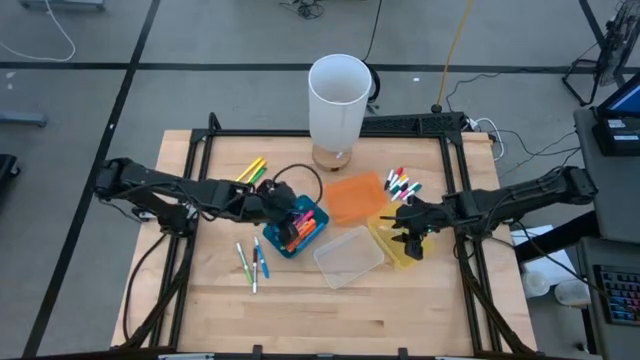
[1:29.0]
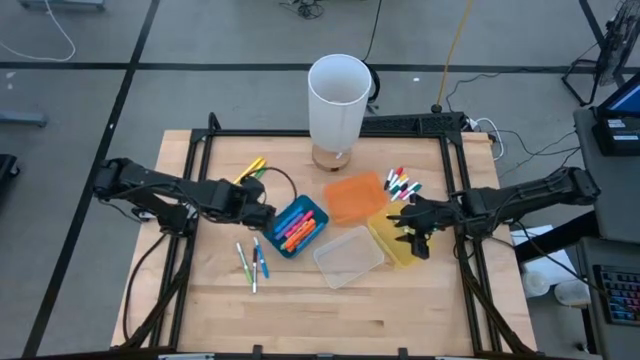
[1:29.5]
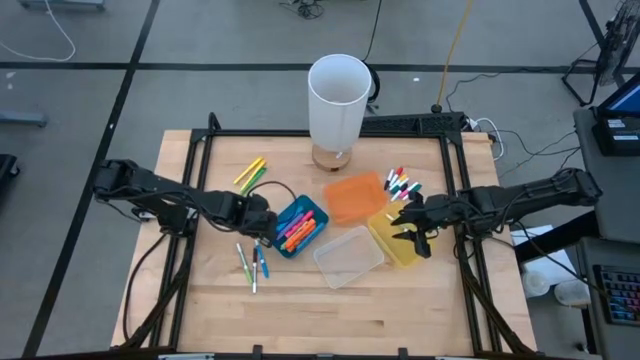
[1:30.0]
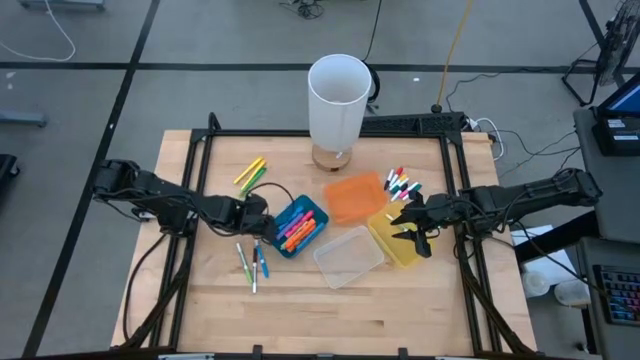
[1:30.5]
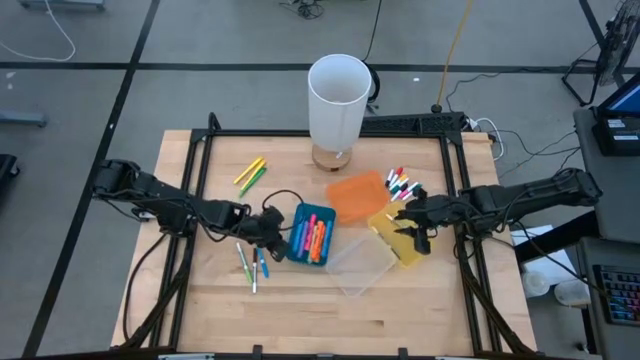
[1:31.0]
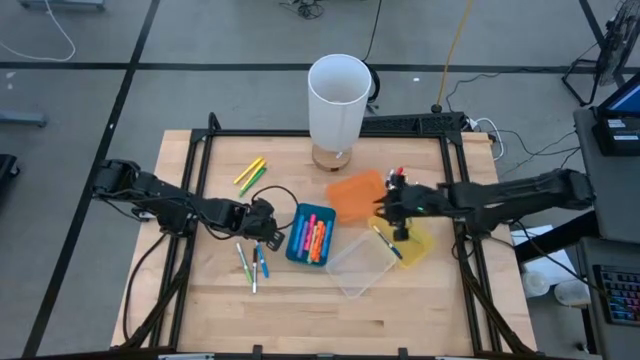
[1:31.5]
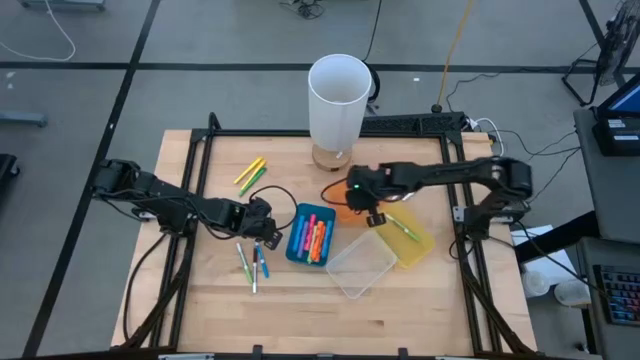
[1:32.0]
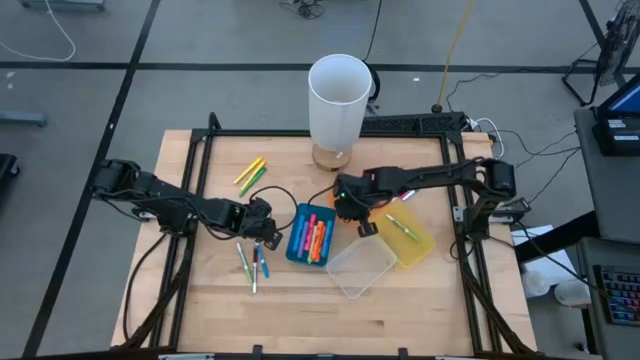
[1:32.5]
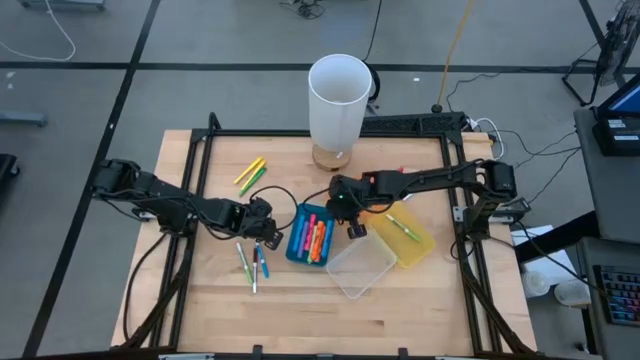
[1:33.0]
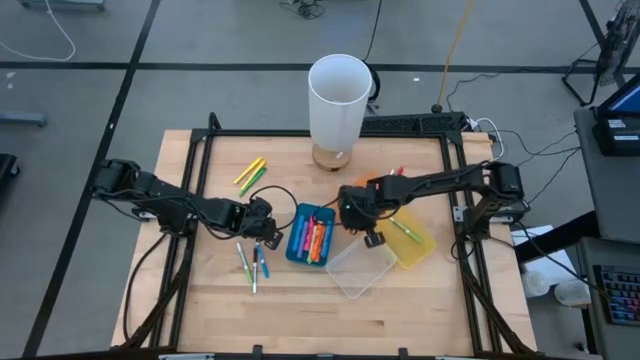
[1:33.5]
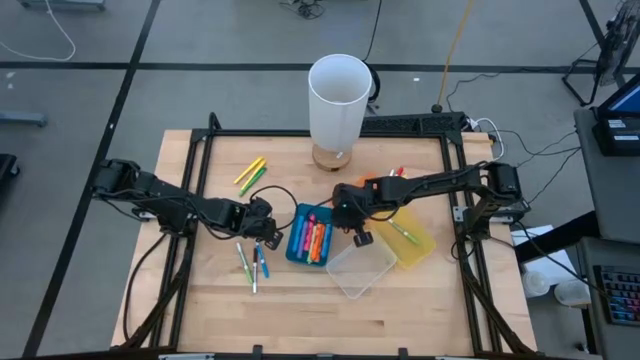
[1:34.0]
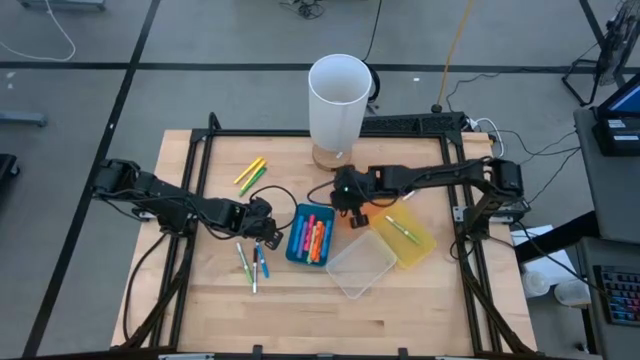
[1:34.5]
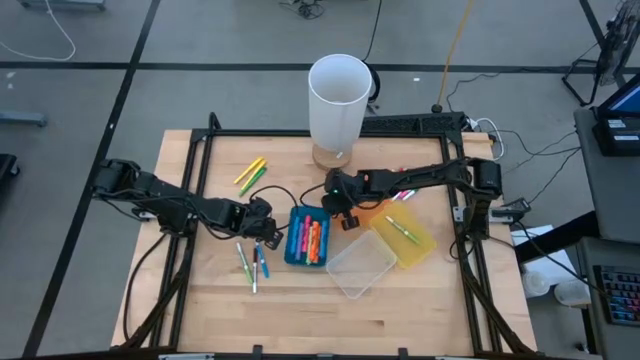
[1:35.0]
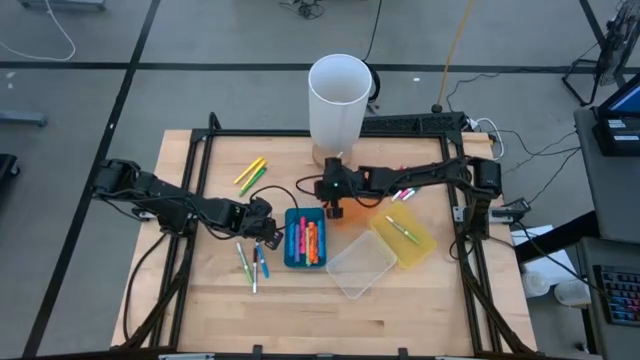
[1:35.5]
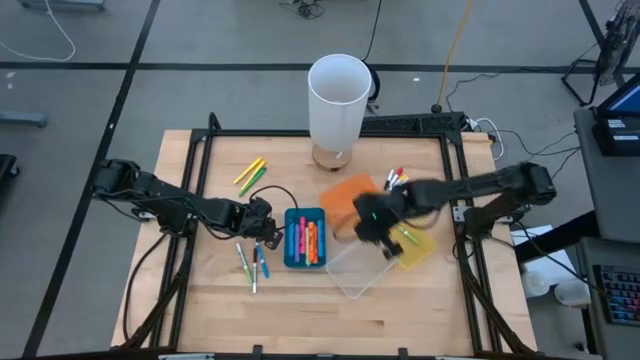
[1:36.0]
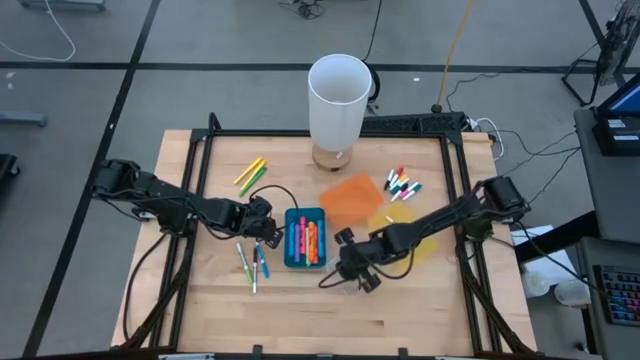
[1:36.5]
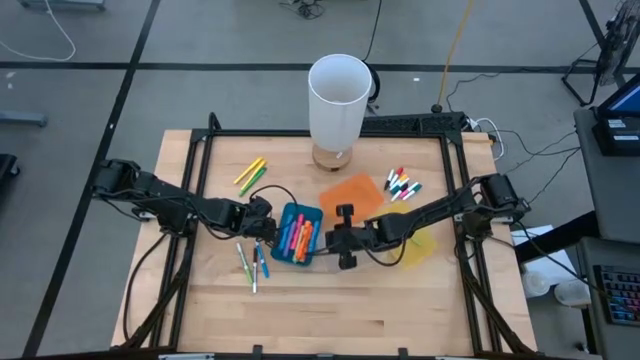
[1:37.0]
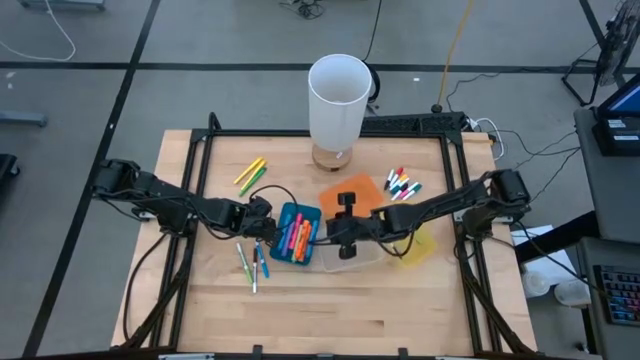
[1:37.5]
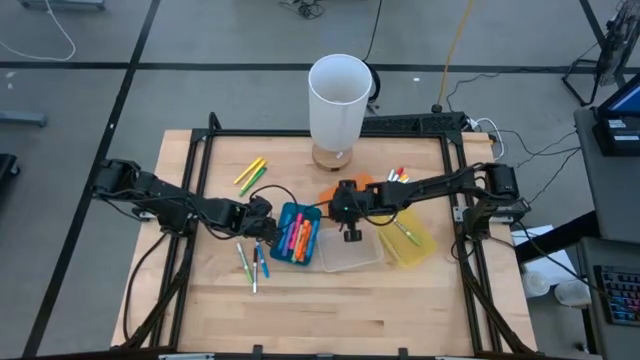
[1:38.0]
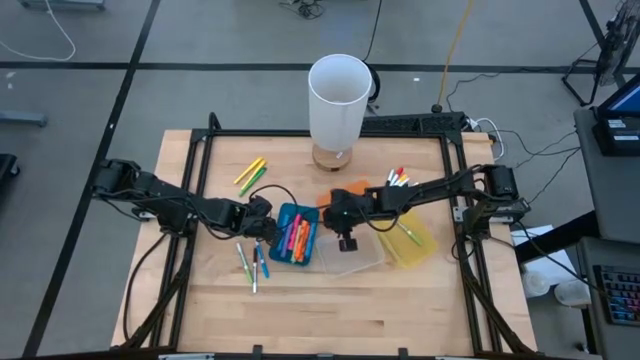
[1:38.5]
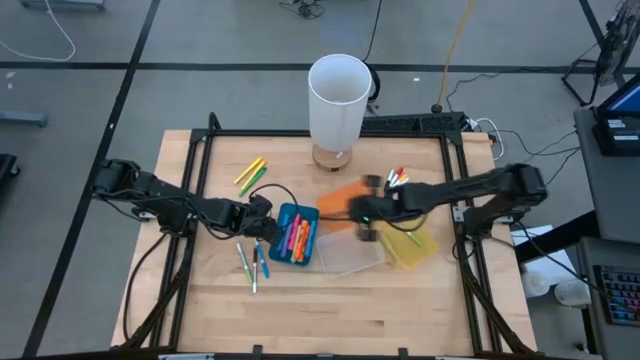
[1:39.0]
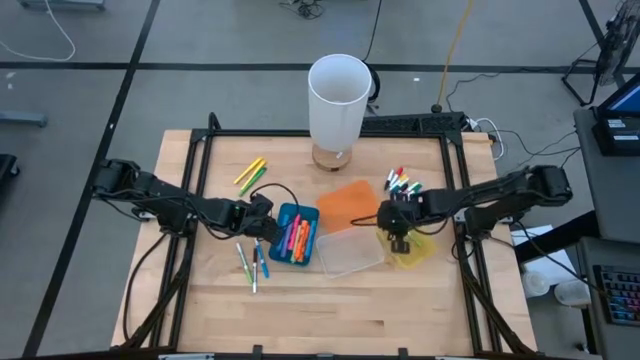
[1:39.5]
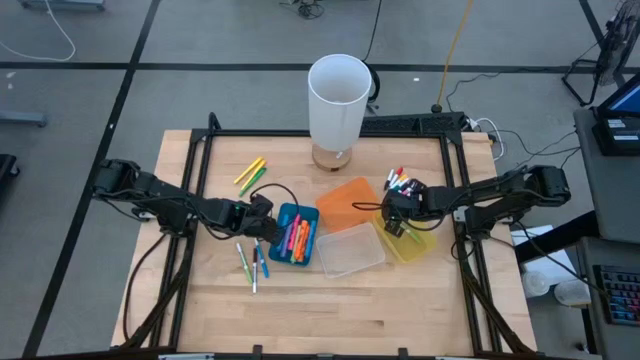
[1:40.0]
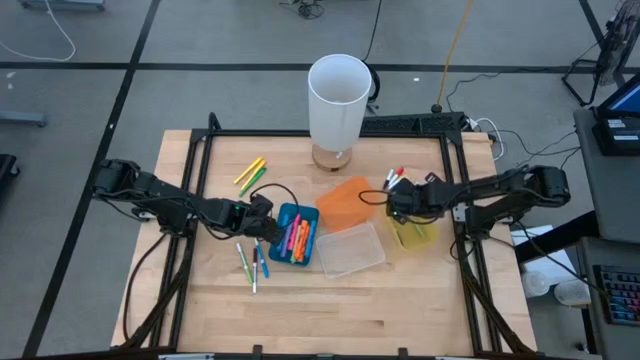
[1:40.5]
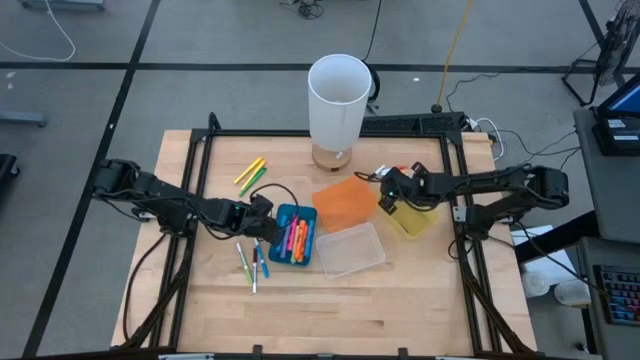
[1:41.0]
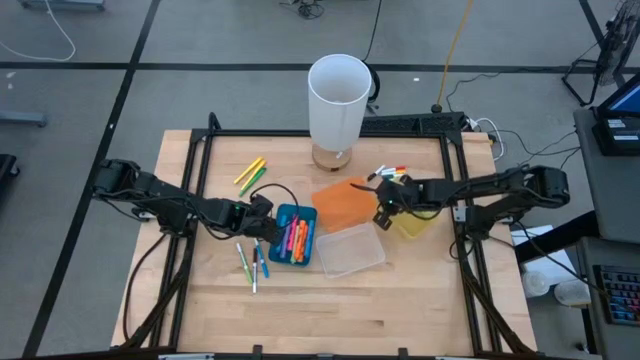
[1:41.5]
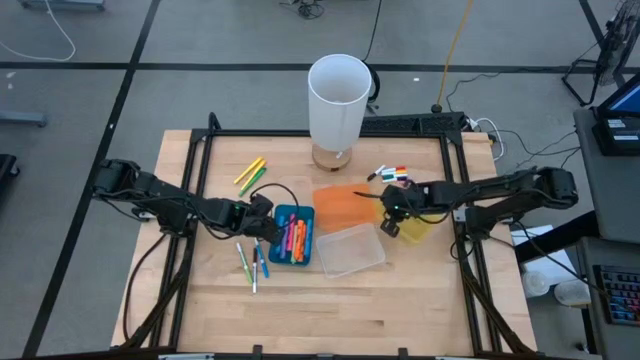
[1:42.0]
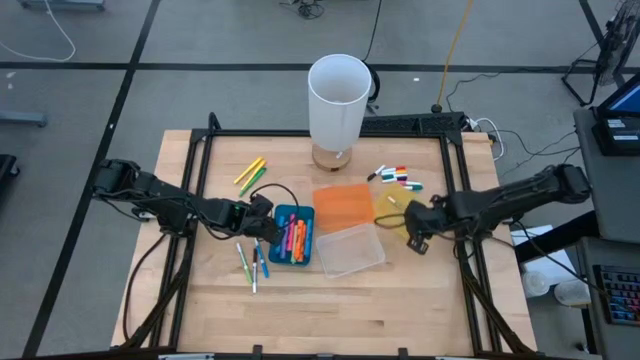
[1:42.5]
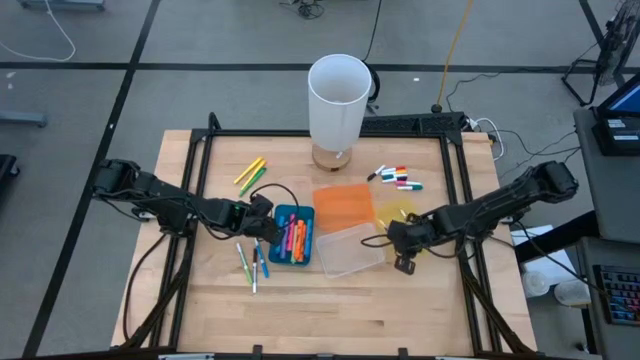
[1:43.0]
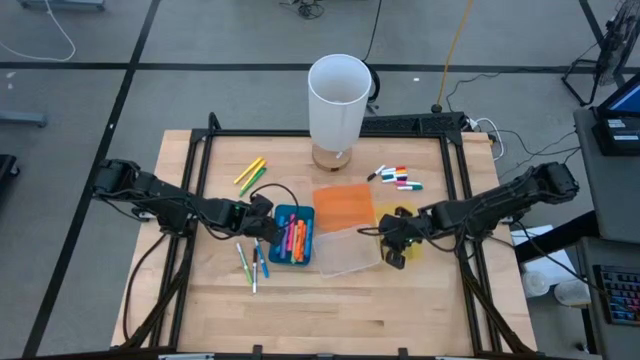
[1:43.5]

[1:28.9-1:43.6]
Task: Pick & Place Markers
Adjust the bins on the table

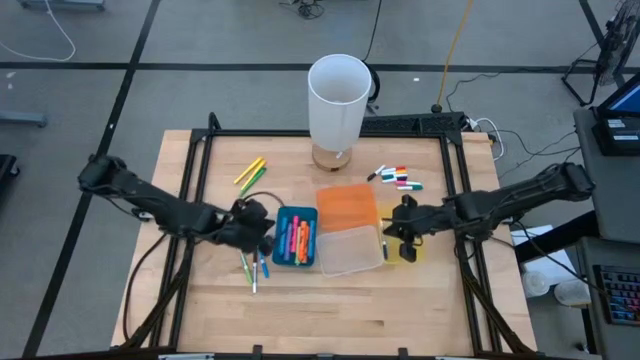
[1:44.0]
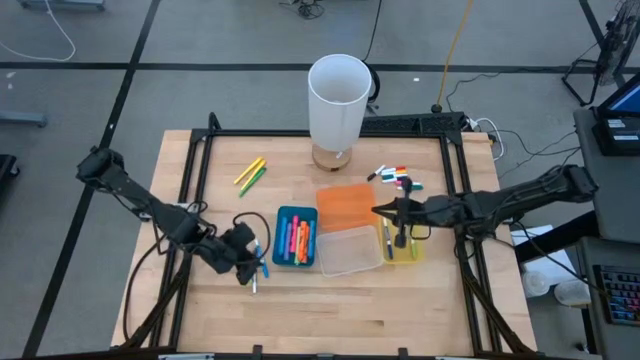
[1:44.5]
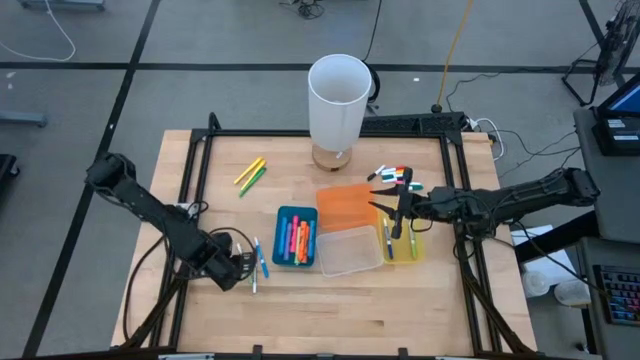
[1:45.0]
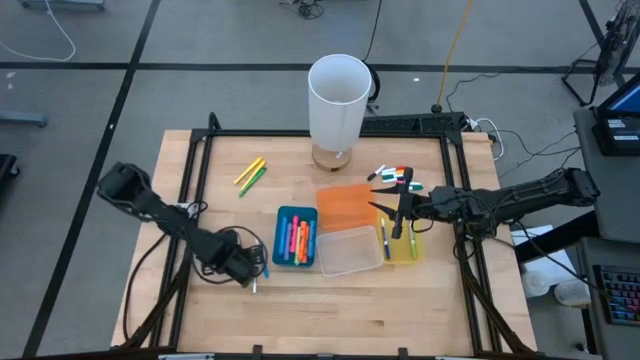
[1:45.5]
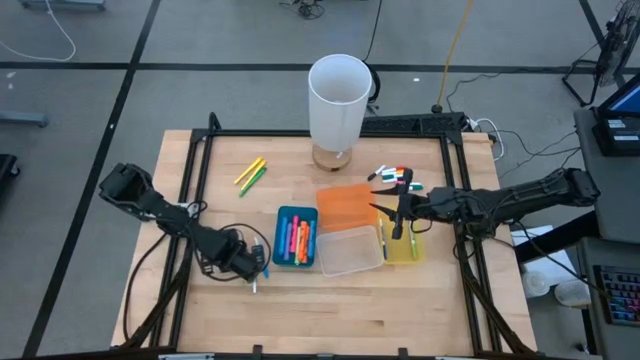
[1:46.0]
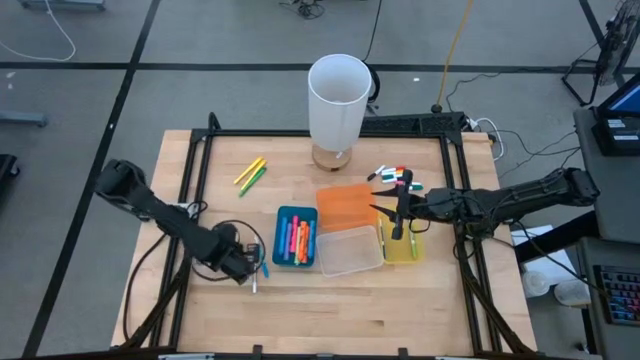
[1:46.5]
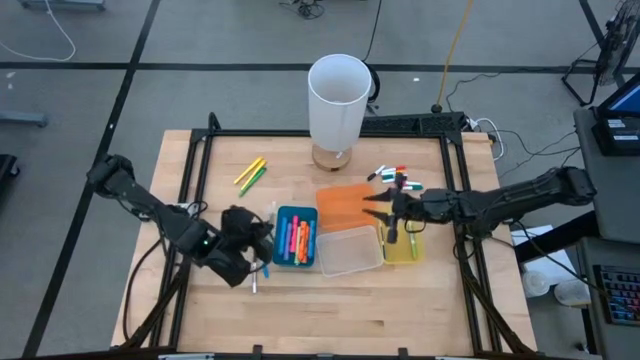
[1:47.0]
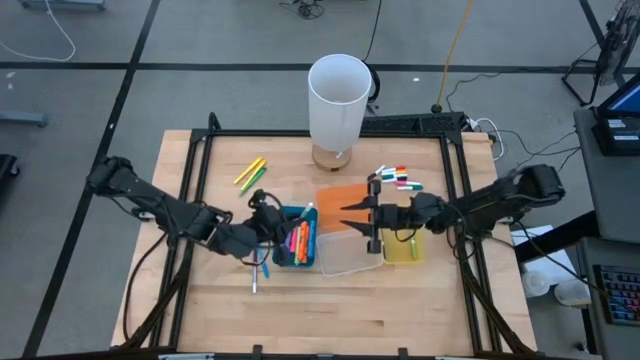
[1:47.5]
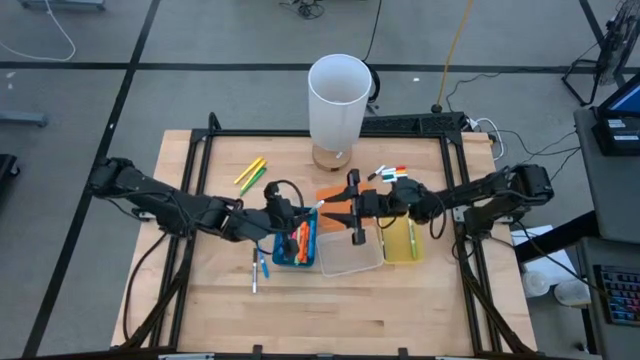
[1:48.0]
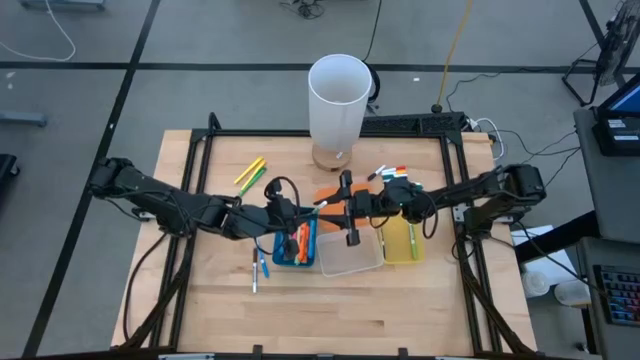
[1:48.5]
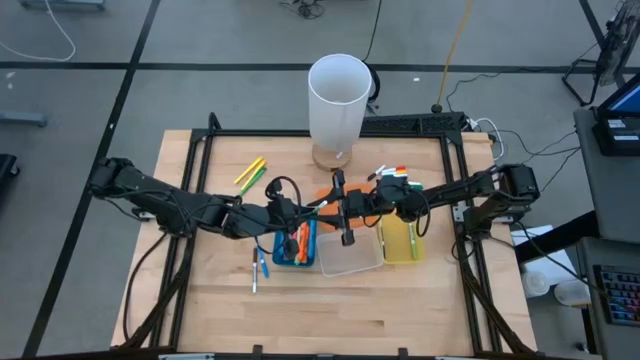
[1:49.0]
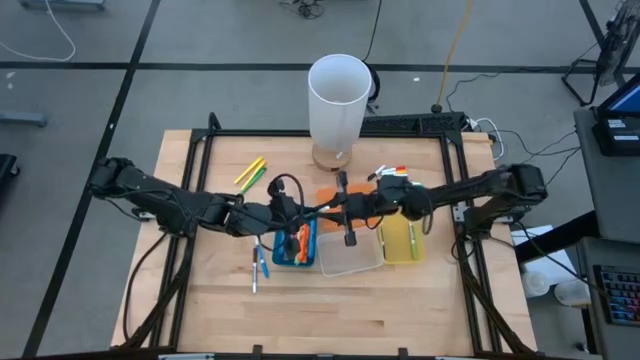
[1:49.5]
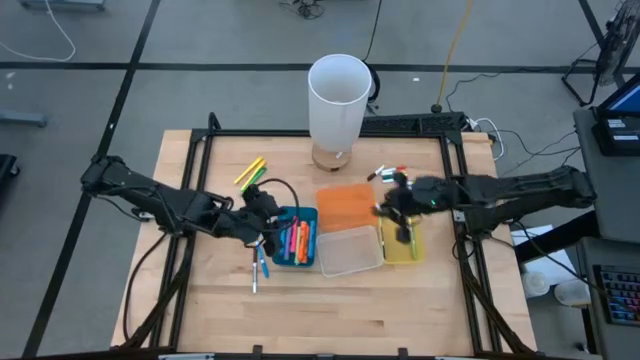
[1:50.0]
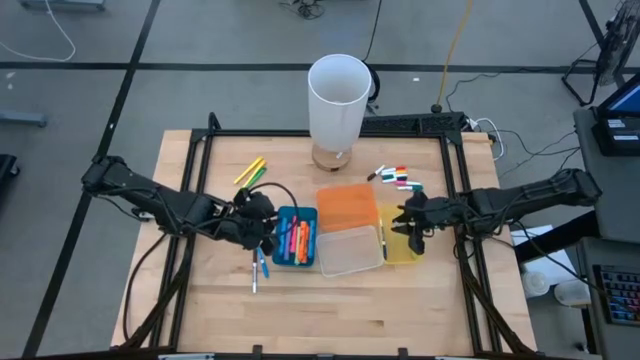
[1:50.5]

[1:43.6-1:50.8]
Put the green marker pen into the yellow bin

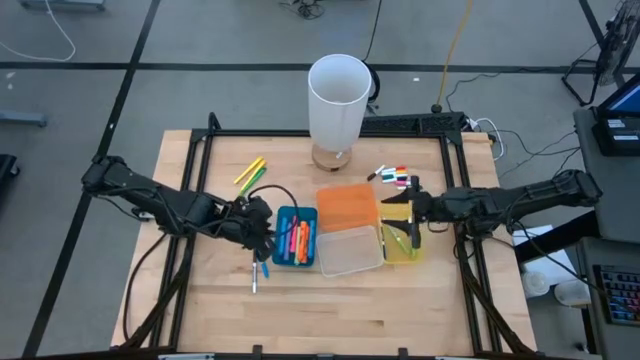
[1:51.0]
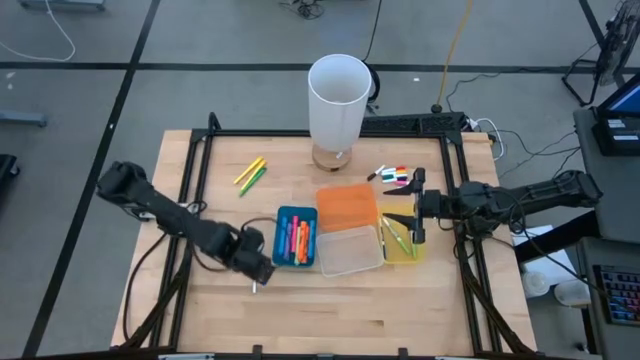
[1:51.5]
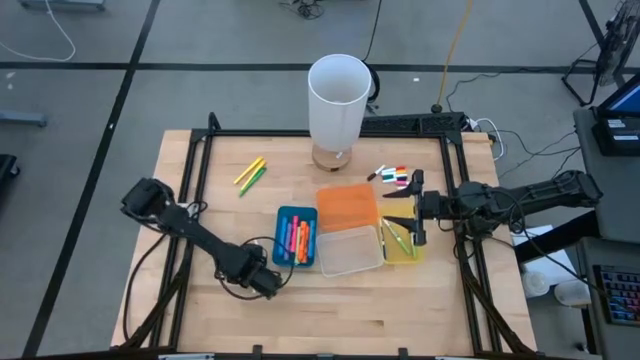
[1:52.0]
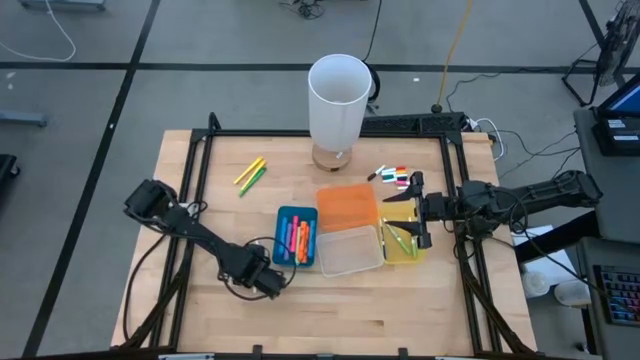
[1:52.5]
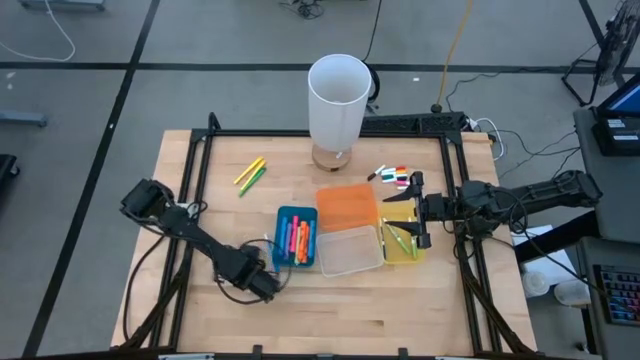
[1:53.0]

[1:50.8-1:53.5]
Put the brown marker pen into the yellow bin
